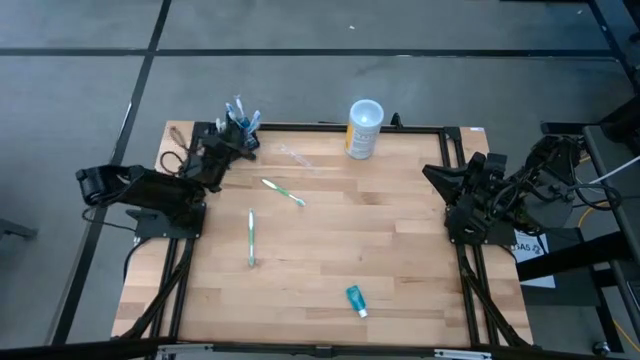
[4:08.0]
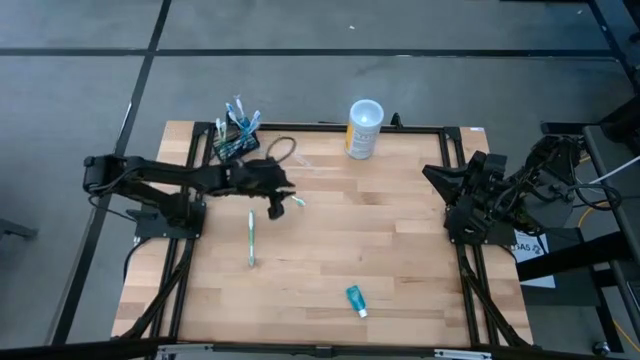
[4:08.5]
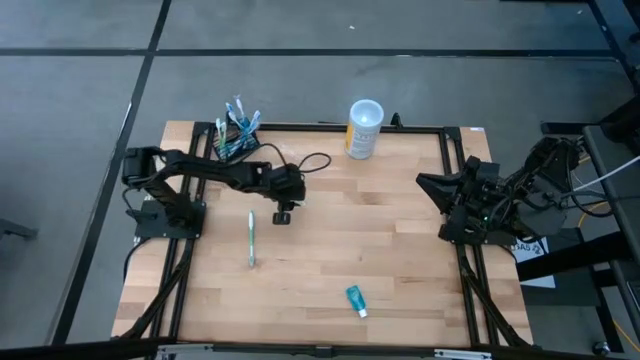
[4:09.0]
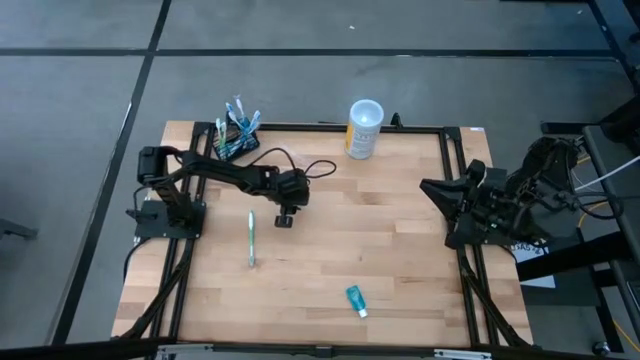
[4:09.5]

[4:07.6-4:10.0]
Task: Pick & Place toothbrushing station
Put the green toothbrush into the black wire organizer

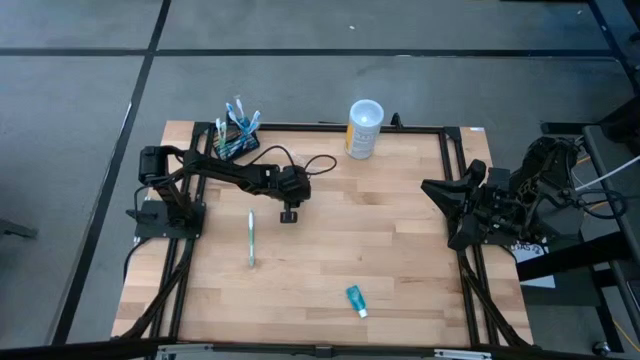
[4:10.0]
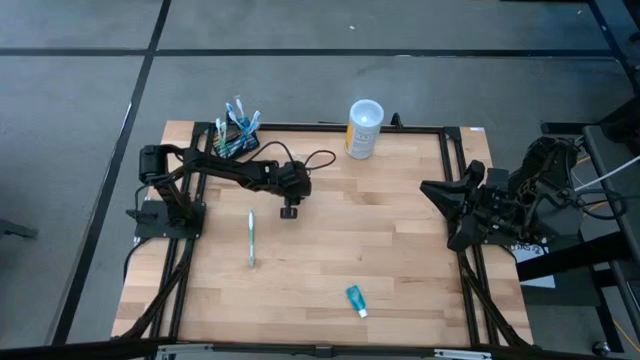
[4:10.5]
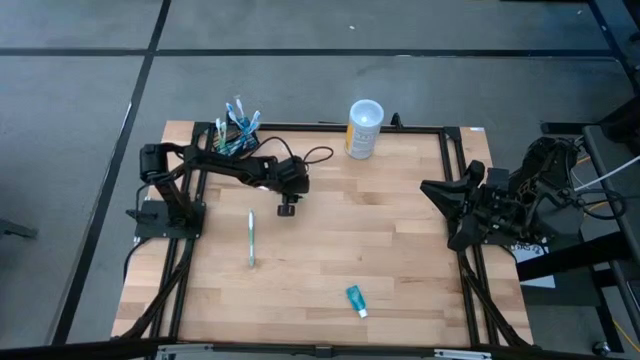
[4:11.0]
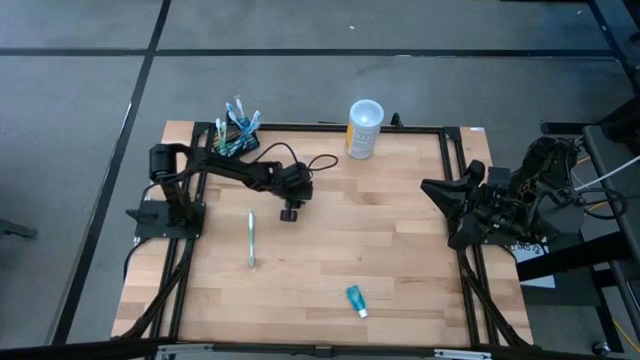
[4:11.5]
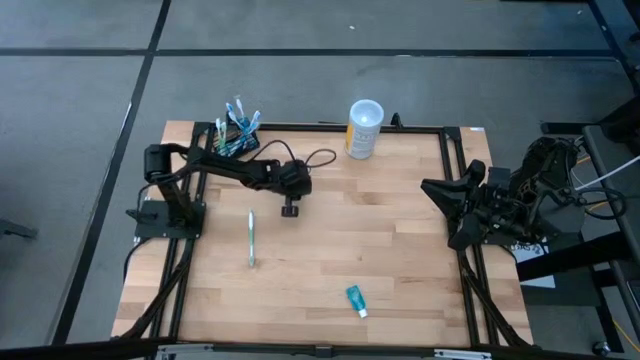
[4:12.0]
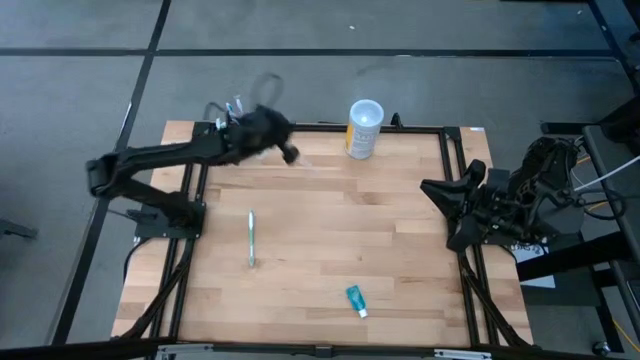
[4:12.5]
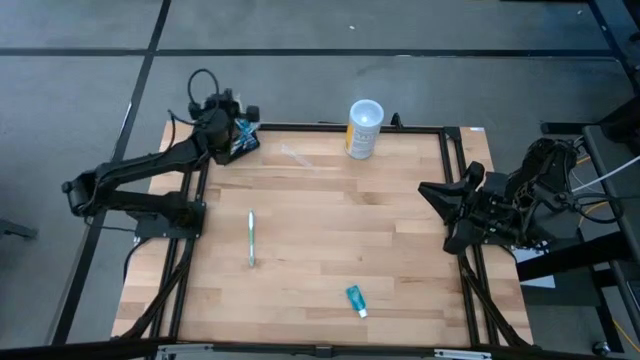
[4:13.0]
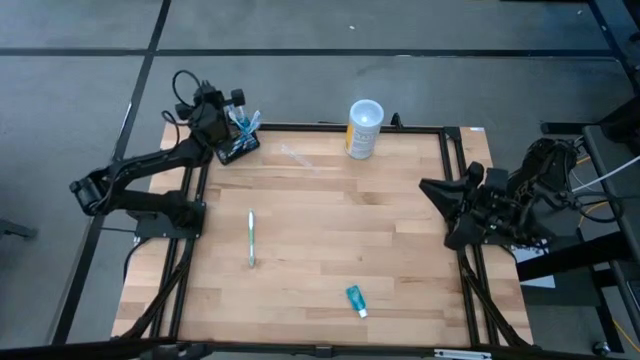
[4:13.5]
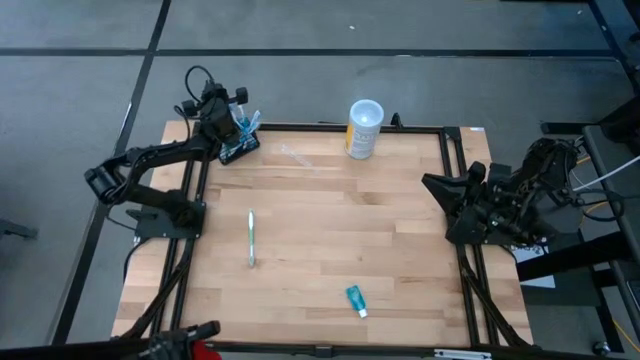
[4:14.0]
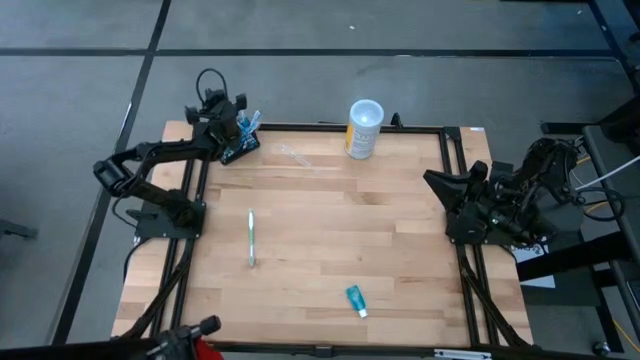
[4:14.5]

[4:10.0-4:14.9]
Put the green toothbrush into the left section of the black organizer

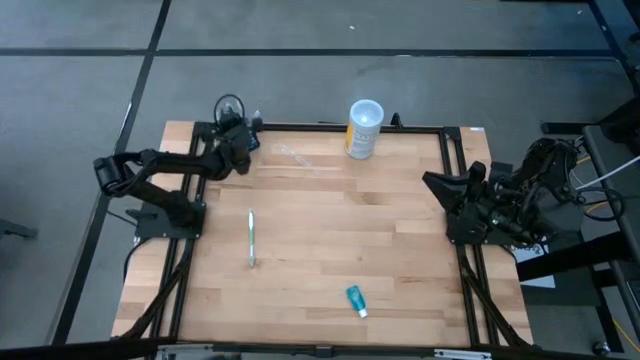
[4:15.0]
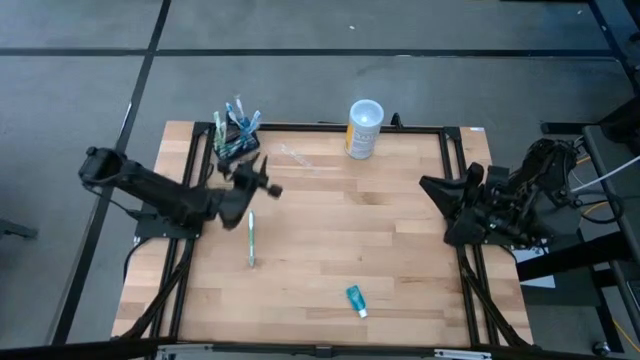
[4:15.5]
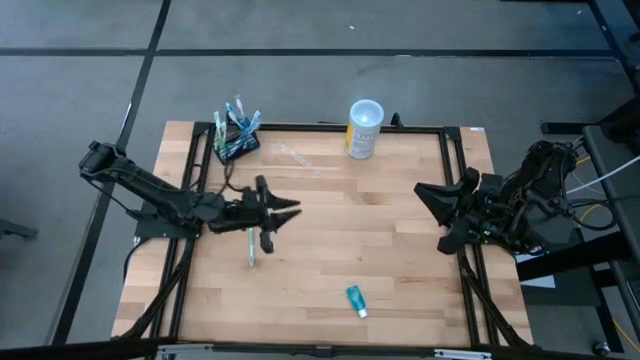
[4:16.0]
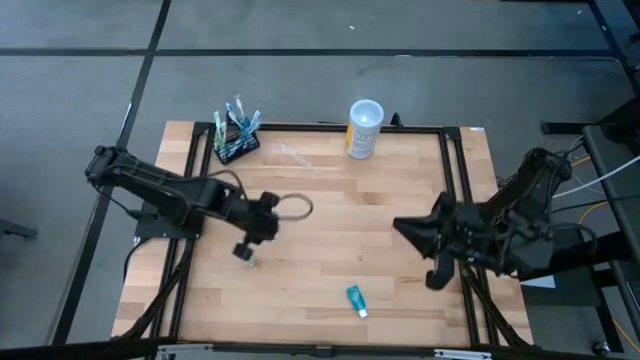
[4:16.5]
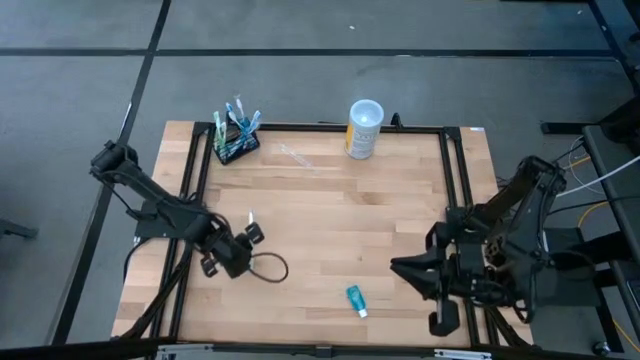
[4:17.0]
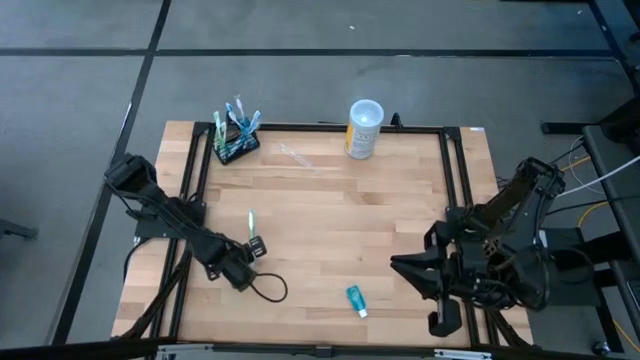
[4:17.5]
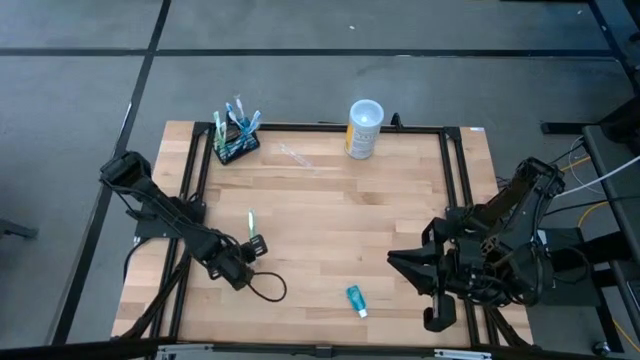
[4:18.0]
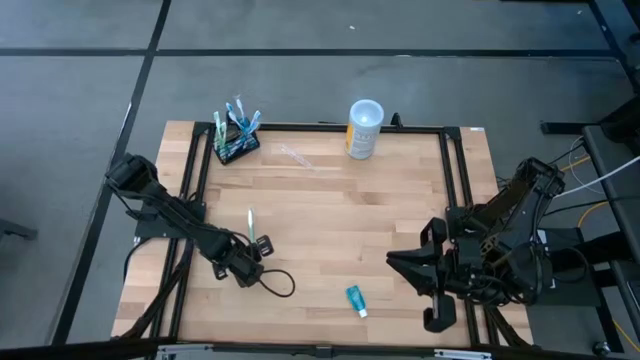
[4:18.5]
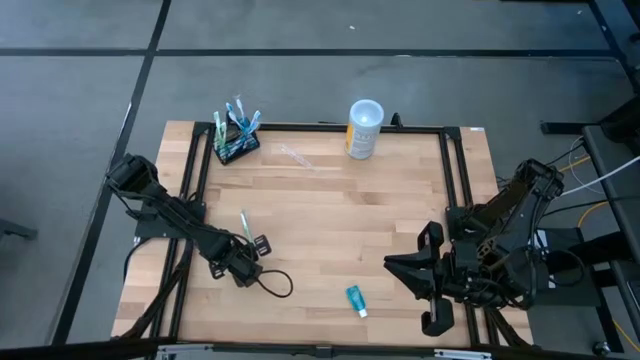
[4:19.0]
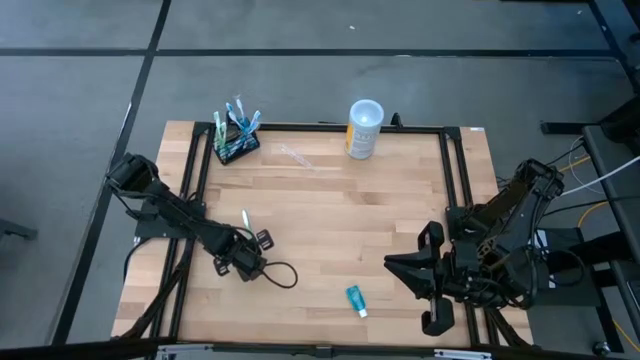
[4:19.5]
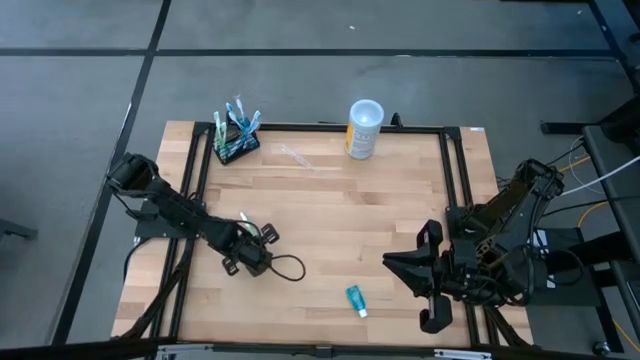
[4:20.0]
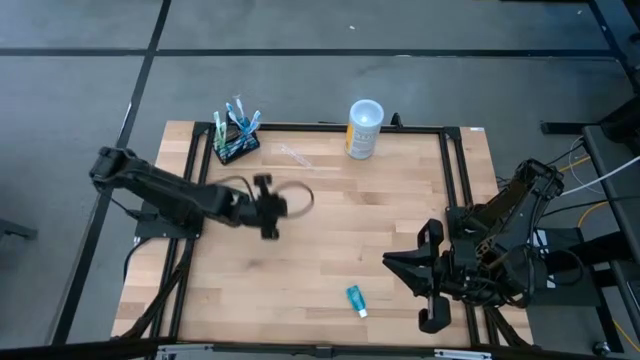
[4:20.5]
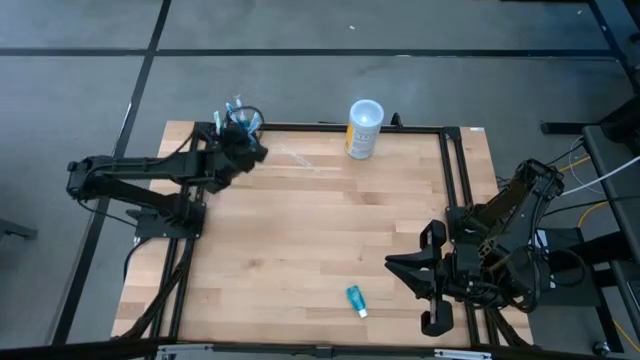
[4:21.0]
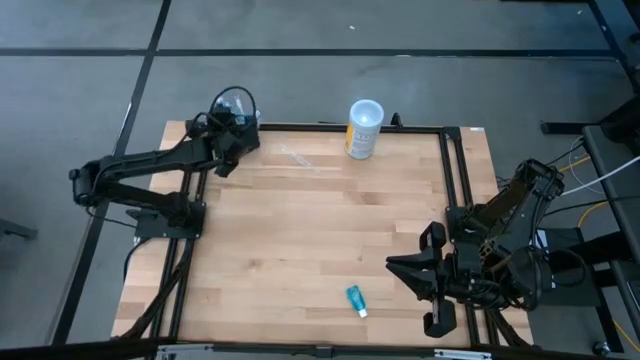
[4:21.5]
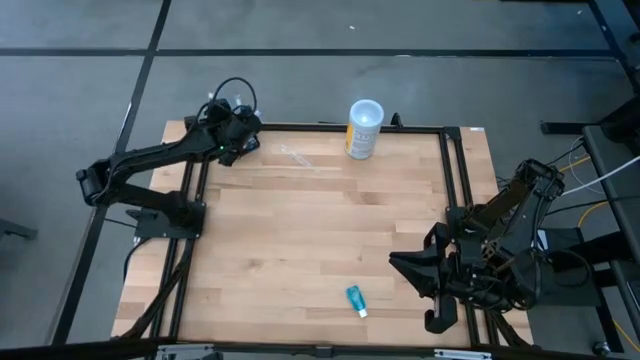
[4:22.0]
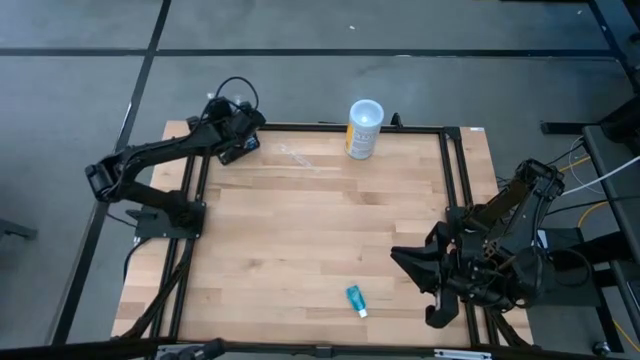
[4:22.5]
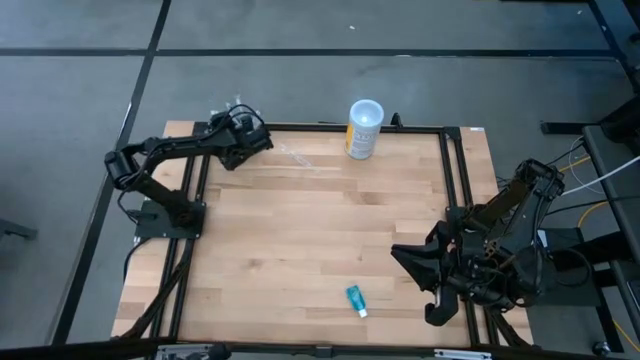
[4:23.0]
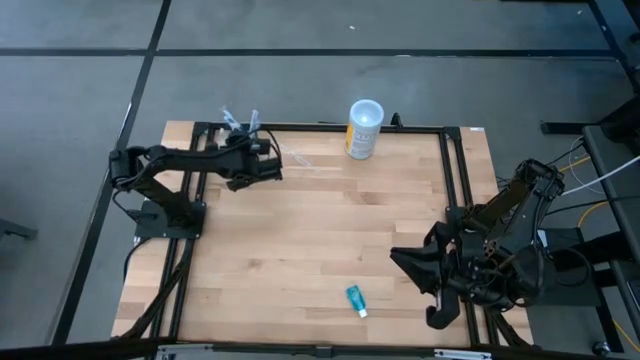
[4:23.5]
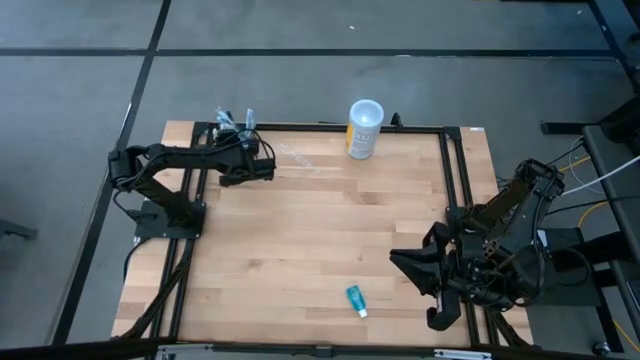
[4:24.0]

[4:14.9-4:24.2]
Put the green toothbrush into the left section of the black organizer

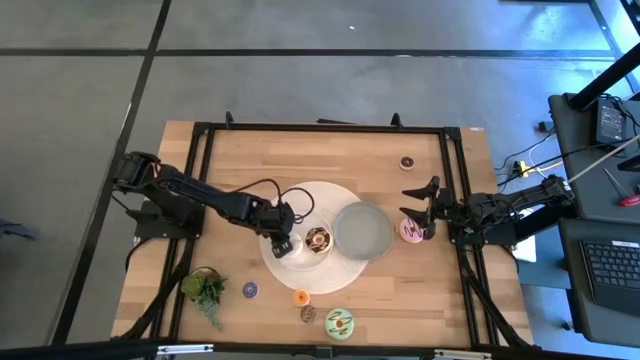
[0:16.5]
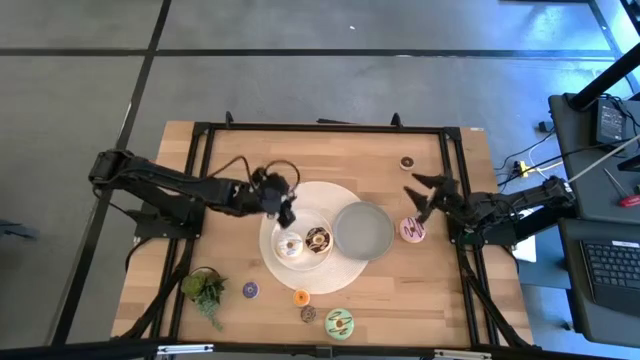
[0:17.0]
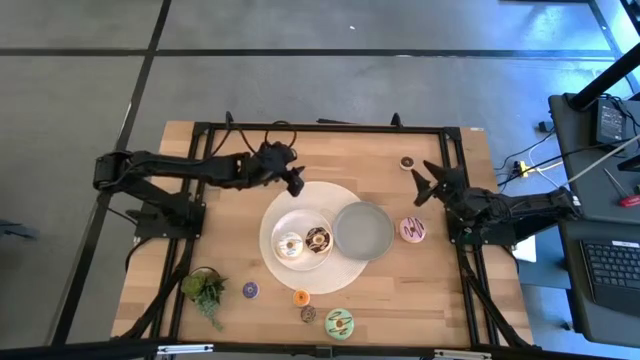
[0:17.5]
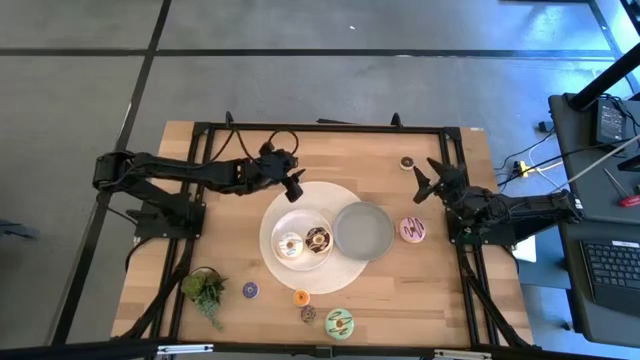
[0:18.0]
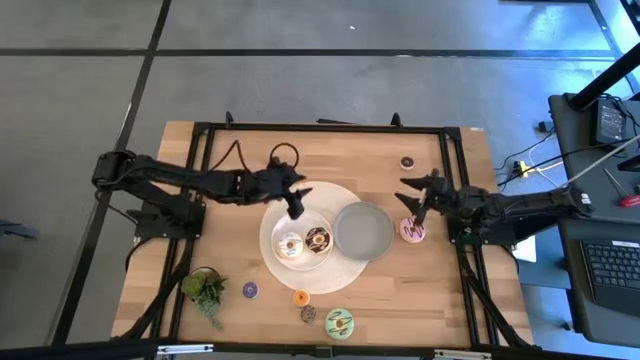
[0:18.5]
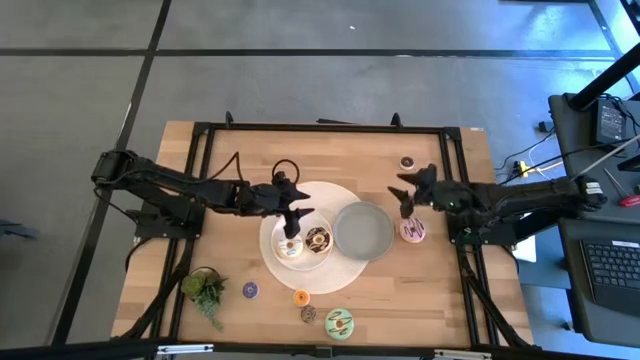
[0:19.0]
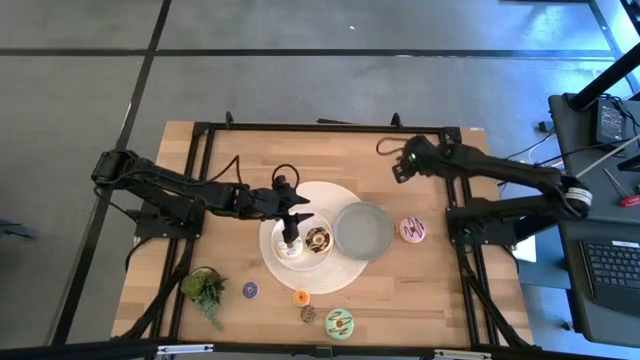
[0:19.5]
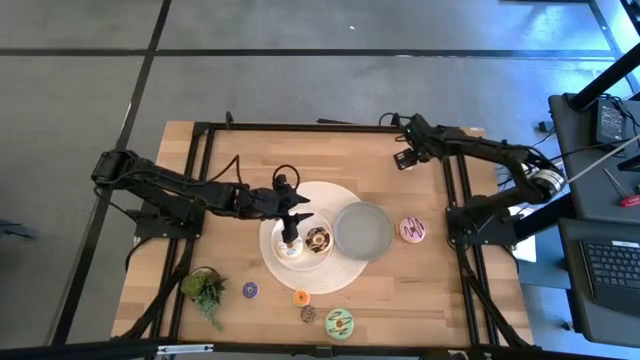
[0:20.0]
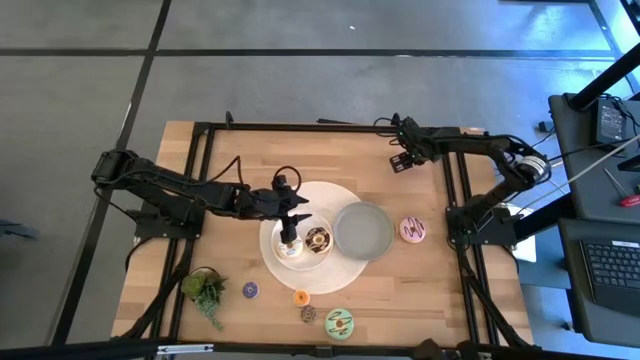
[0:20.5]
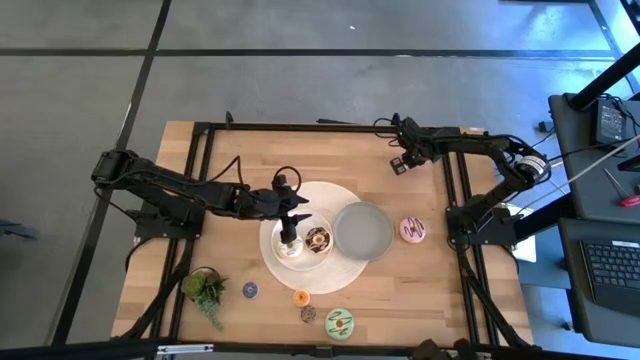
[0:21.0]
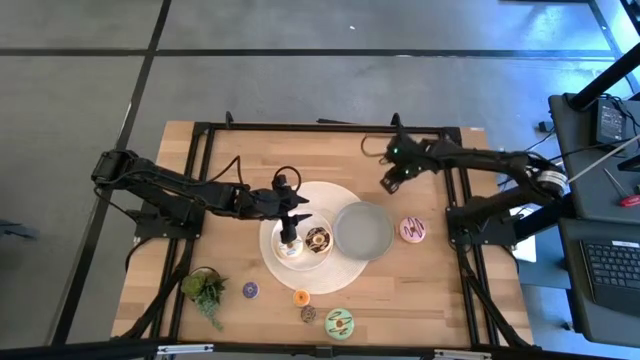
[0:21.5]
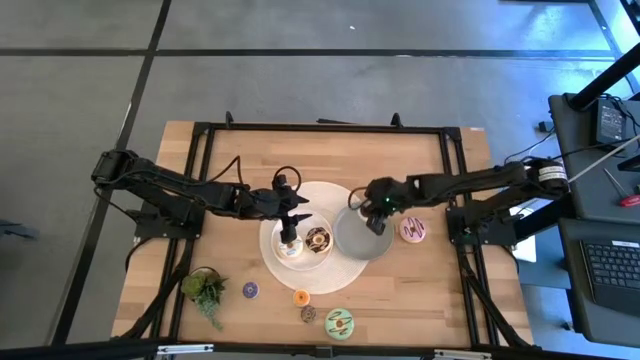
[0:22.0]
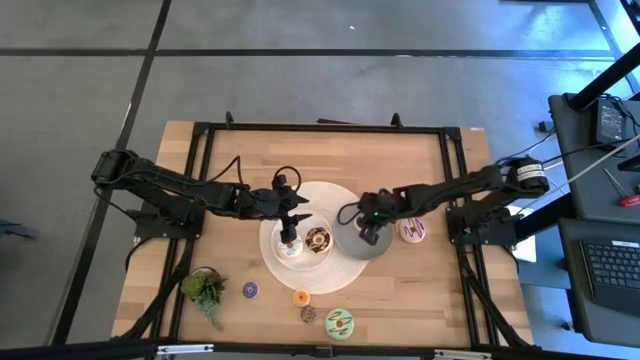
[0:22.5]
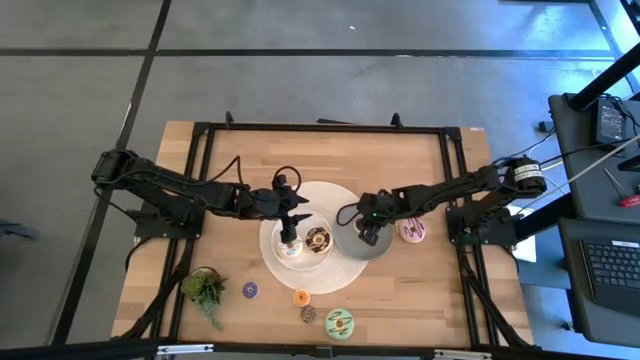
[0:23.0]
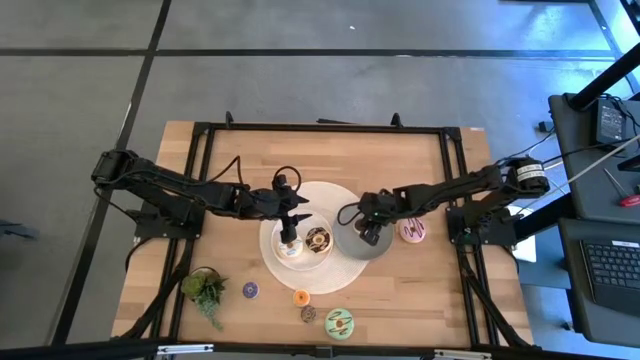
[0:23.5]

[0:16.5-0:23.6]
Task: Pick & Place donuts
Put the small black donut on the gray plate
